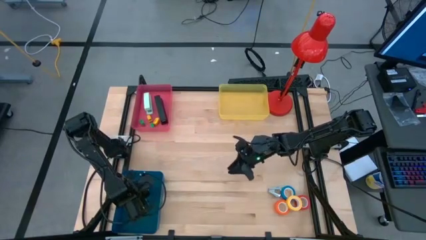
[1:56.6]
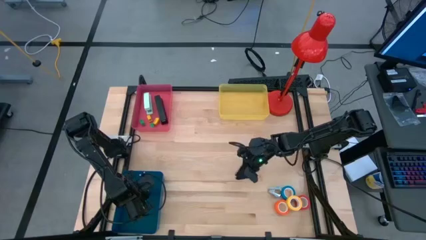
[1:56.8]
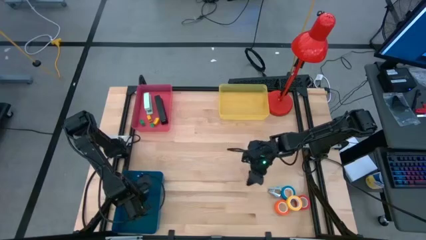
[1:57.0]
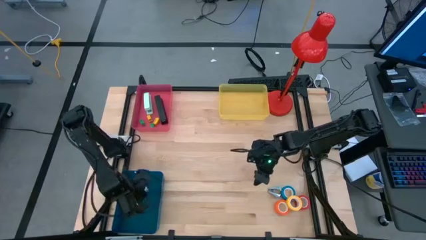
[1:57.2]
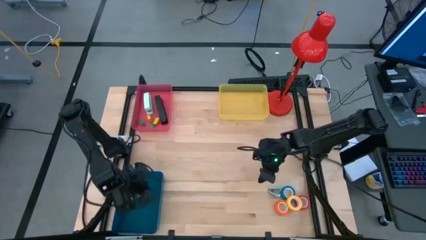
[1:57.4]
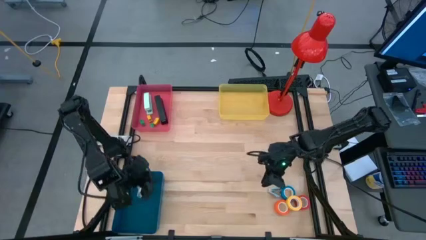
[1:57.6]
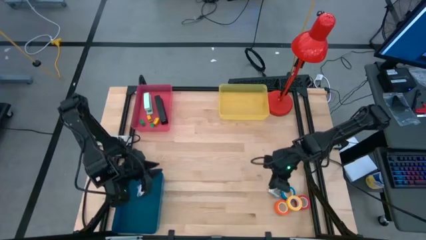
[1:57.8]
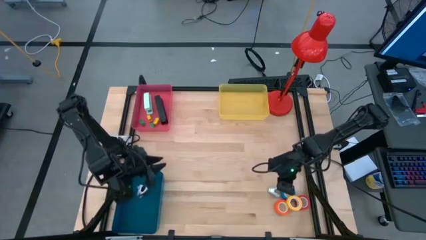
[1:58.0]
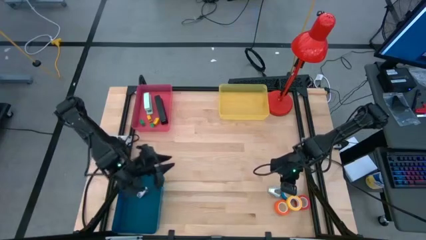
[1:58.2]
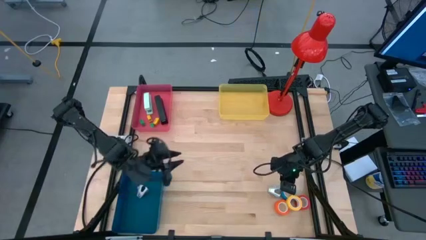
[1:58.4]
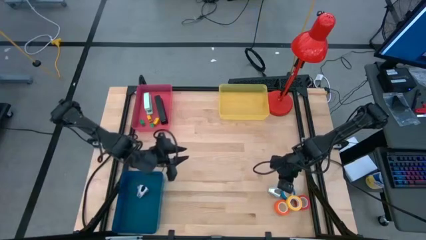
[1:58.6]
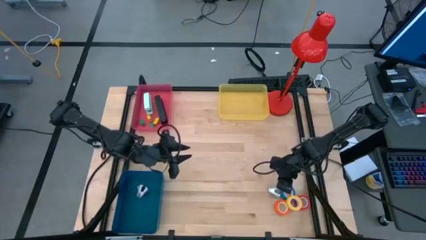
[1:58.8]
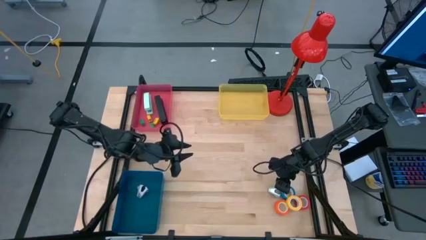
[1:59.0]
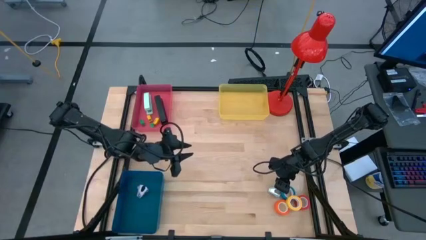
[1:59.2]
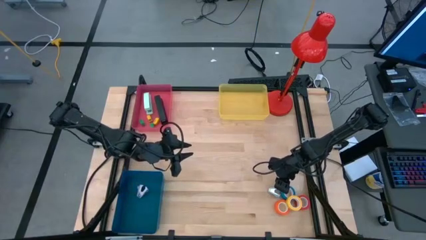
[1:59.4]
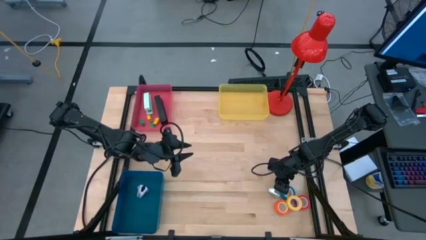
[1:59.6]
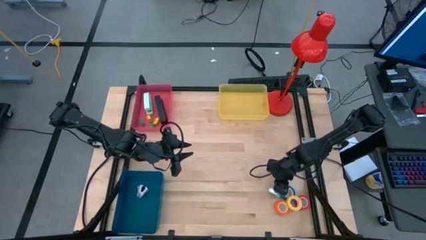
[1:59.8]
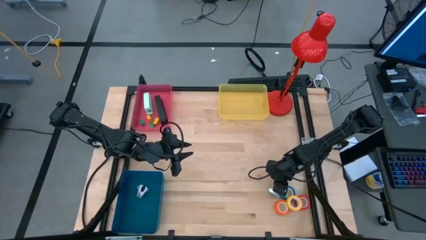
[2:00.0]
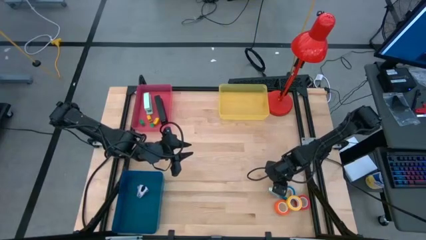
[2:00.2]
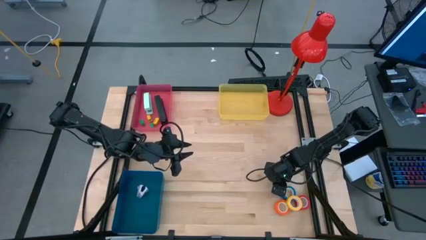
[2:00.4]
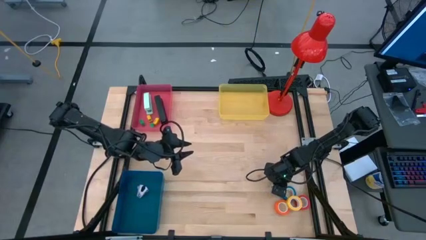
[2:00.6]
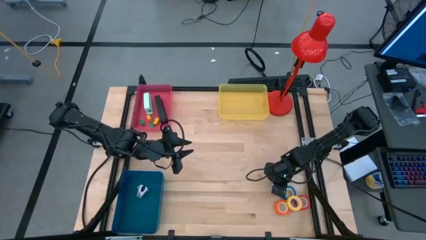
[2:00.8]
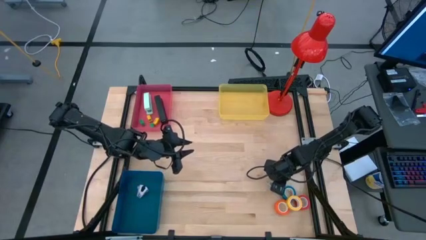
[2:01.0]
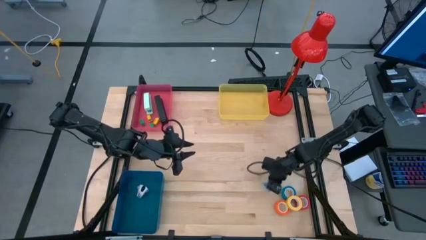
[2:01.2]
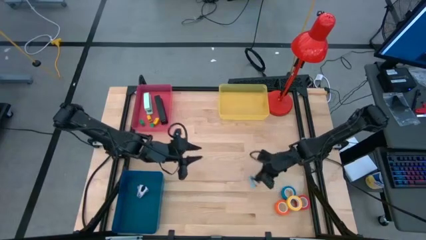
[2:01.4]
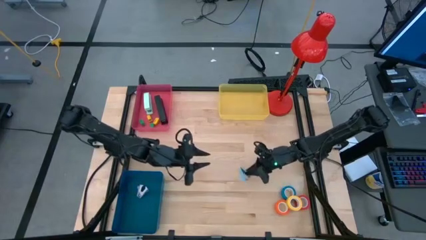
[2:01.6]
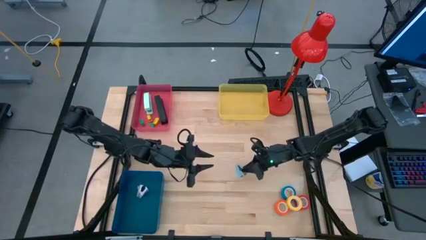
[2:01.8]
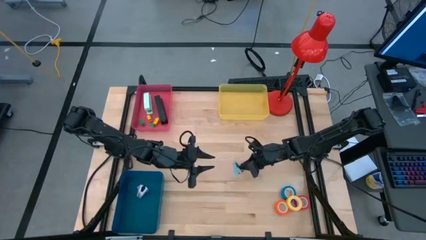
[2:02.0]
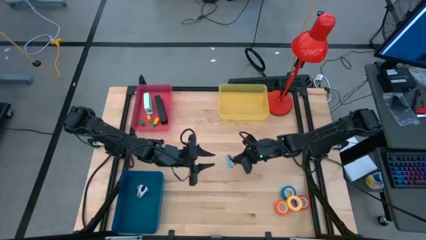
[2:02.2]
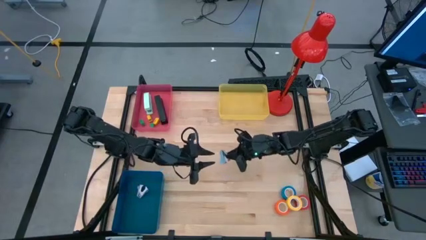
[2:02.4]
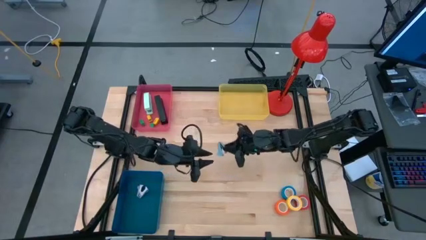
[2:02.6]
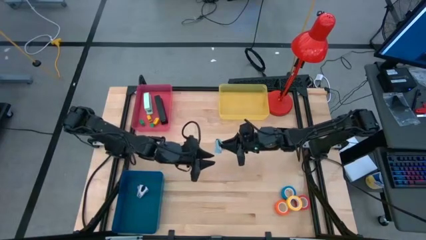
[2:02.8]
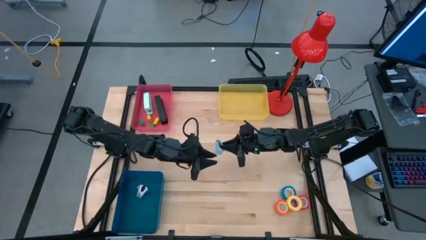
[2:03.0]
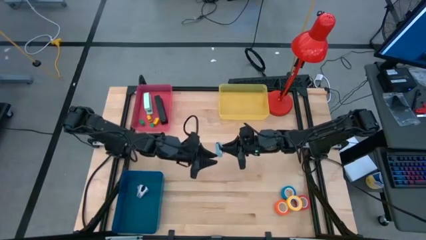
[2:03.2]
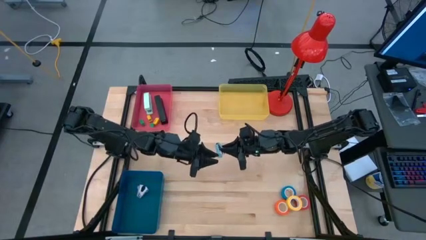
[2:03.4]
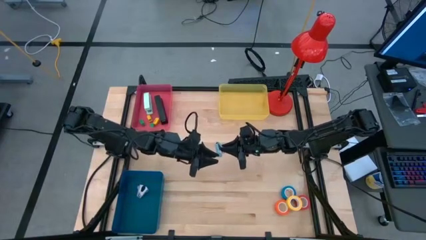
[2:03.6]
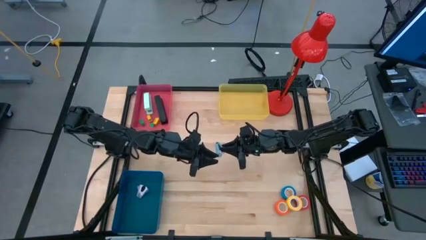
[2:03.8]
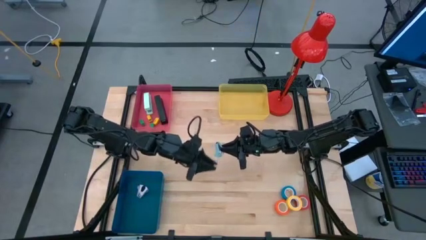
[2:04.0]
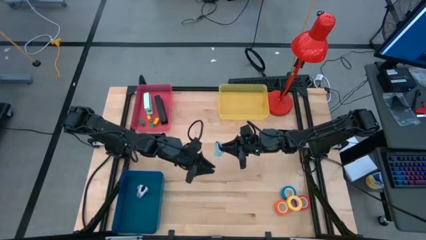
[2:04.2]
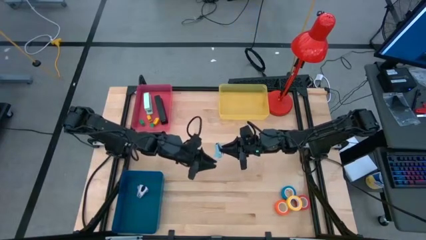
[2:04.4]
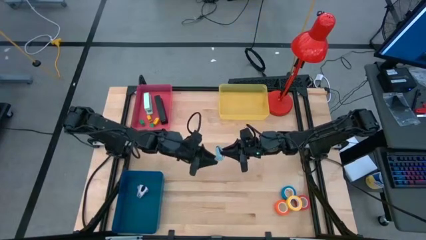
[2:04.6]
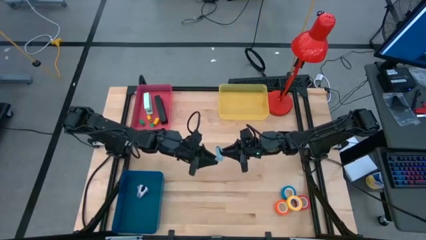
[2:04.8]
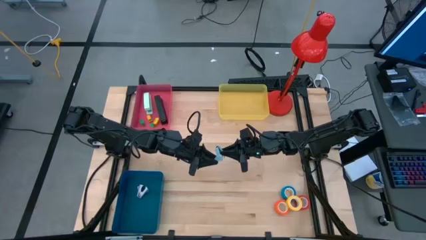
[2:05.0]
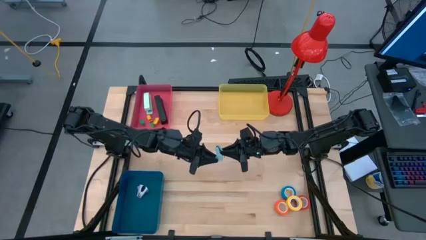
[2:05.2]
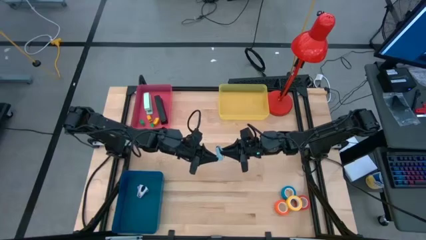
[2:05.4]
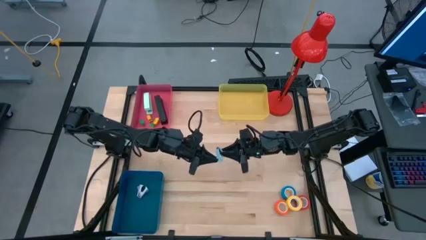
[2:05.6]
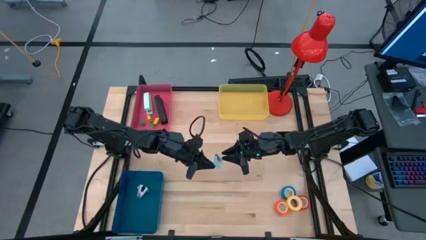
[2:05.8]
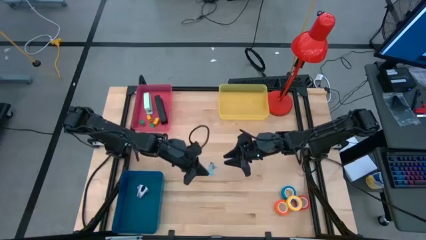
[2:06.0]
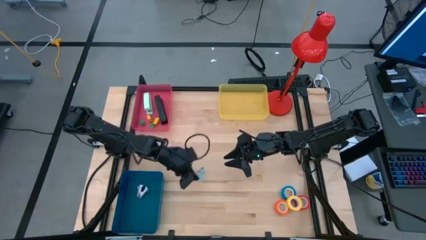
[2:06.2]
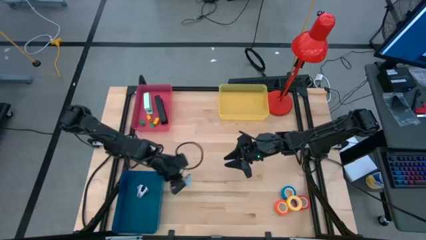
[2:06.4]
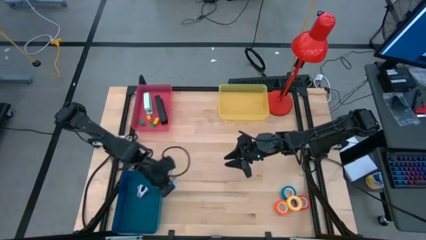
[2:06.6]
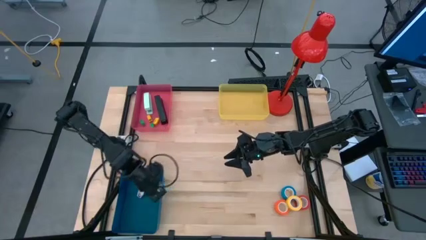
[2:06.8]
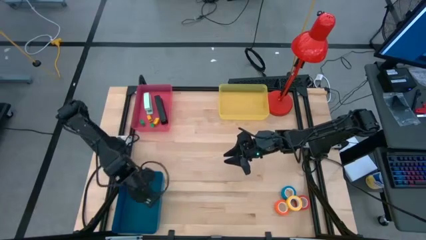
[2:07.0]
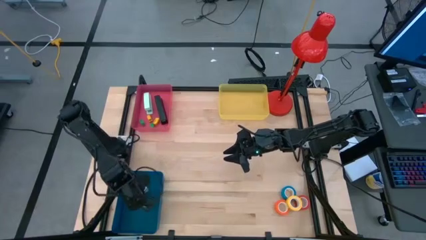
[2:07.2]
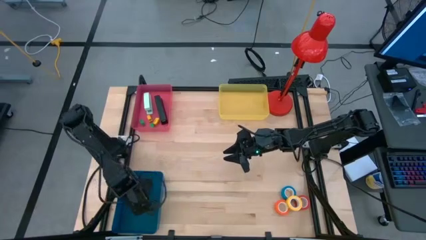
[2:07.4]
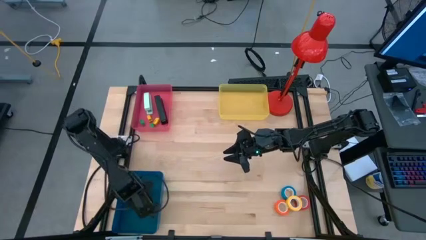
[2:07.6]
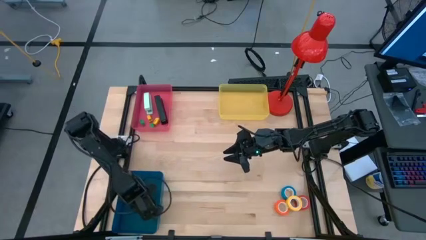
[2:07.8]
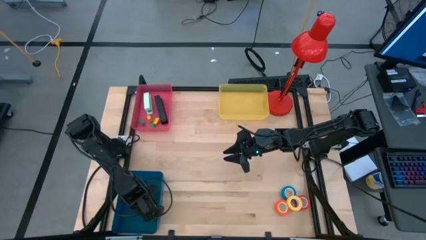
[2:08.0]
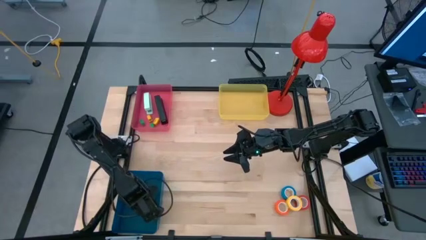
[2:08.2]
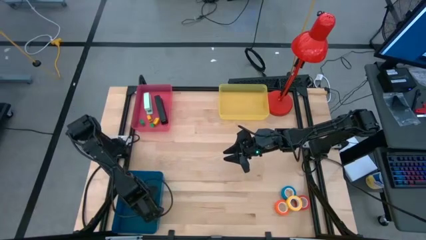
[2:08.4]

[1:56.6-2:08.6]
Task: Pick and place Stapler, Stapler remover, tape
Put the blue staple remover into the blue bin
